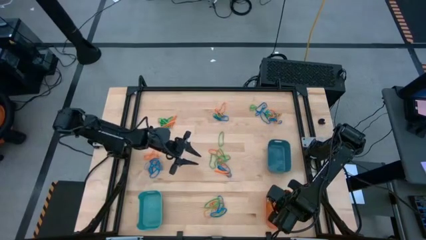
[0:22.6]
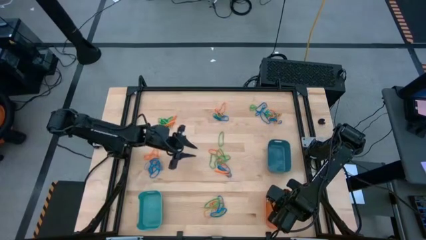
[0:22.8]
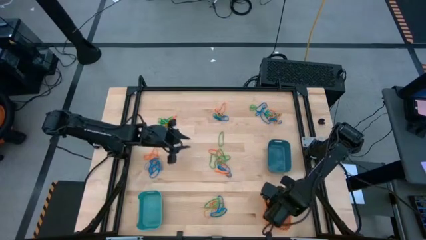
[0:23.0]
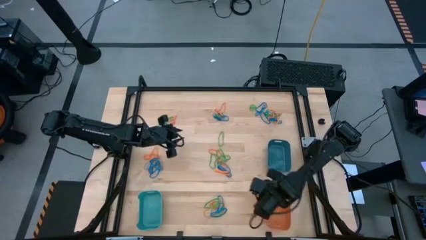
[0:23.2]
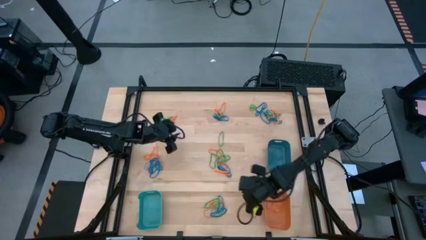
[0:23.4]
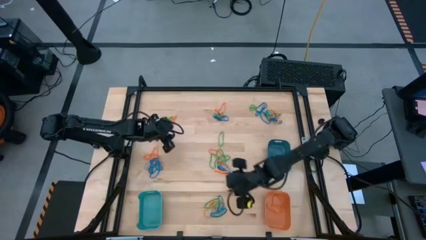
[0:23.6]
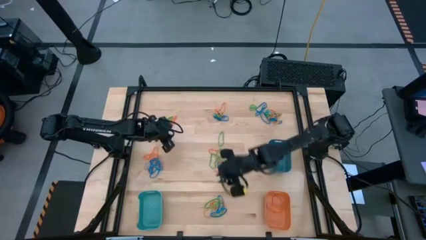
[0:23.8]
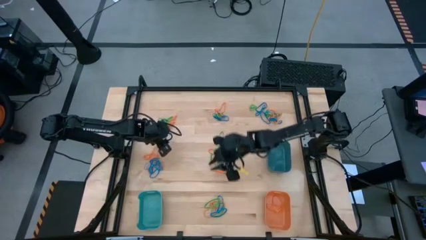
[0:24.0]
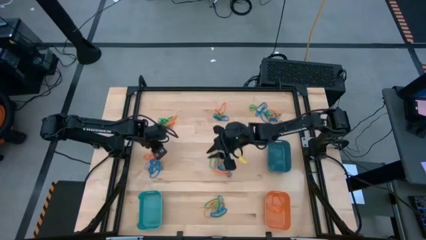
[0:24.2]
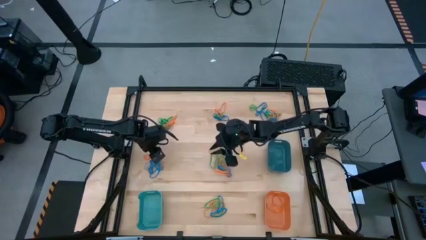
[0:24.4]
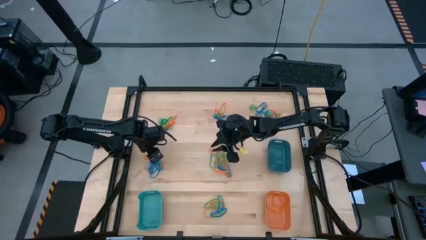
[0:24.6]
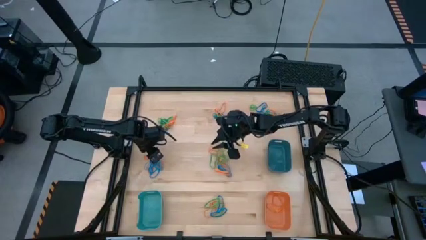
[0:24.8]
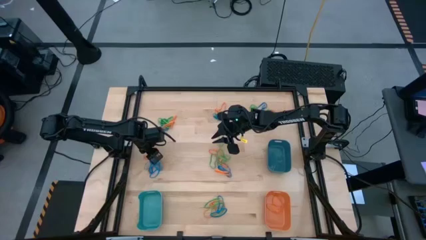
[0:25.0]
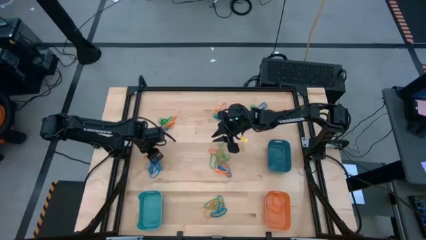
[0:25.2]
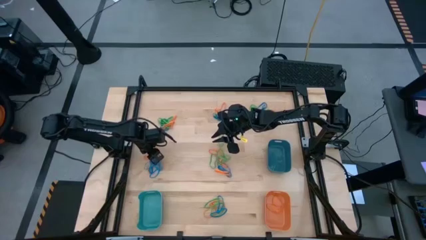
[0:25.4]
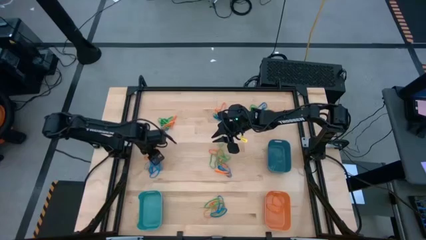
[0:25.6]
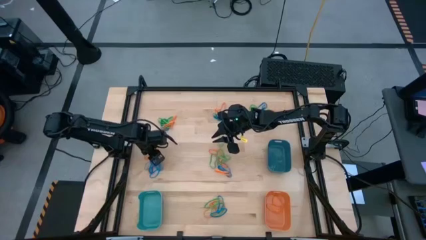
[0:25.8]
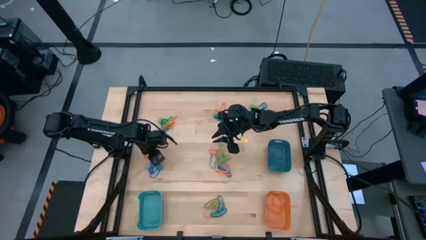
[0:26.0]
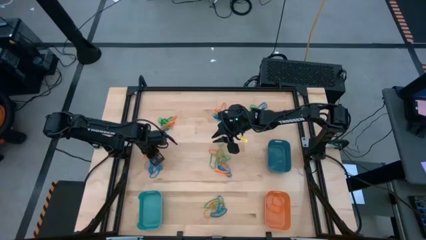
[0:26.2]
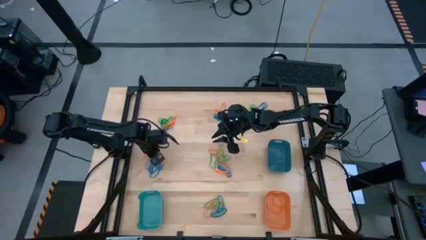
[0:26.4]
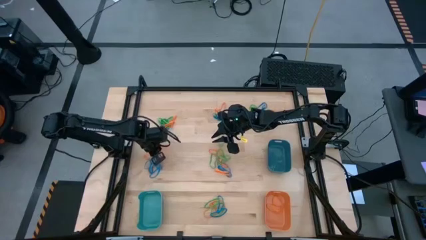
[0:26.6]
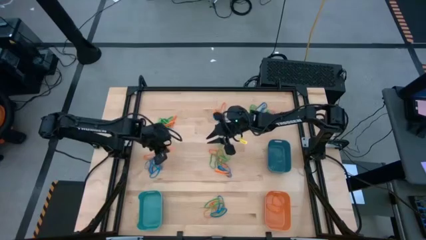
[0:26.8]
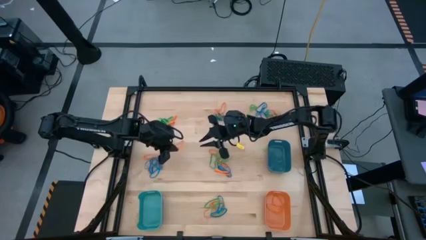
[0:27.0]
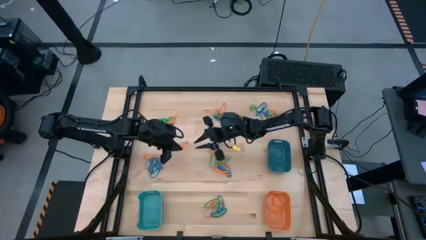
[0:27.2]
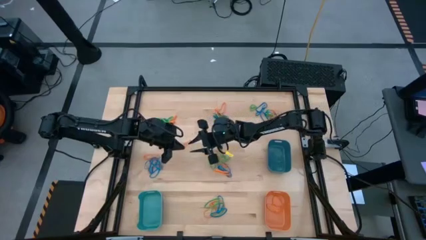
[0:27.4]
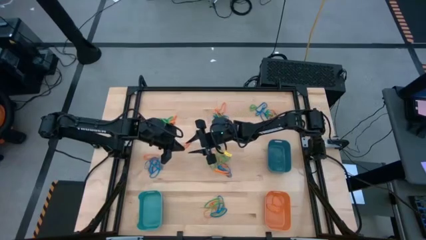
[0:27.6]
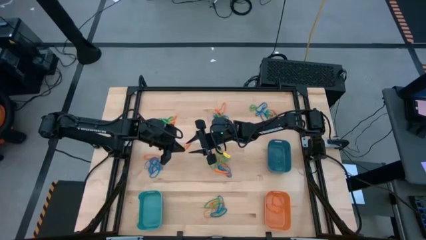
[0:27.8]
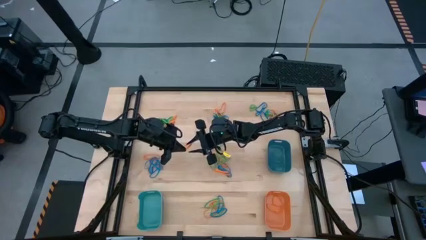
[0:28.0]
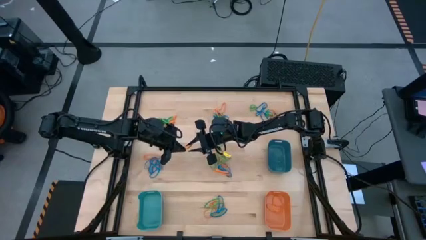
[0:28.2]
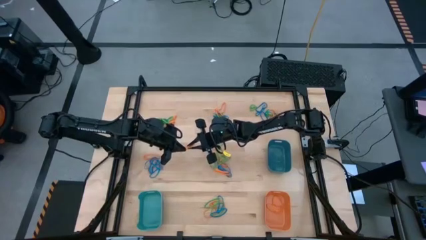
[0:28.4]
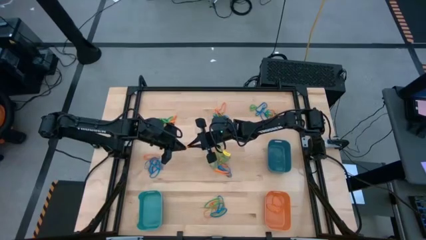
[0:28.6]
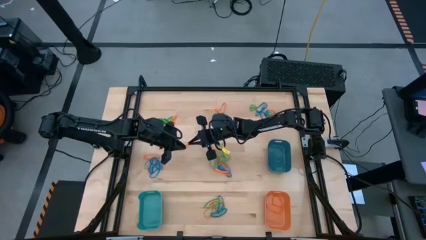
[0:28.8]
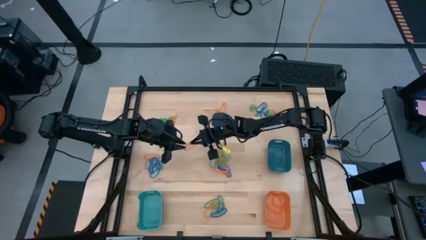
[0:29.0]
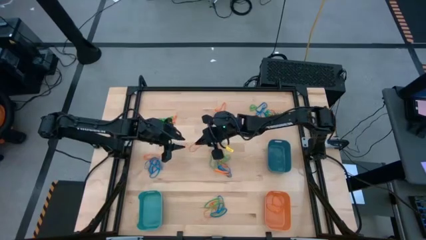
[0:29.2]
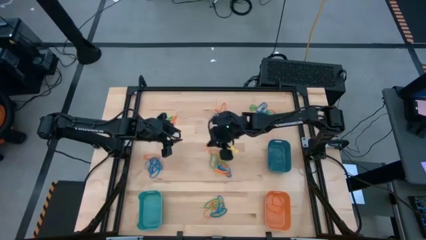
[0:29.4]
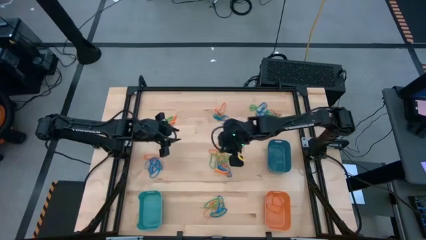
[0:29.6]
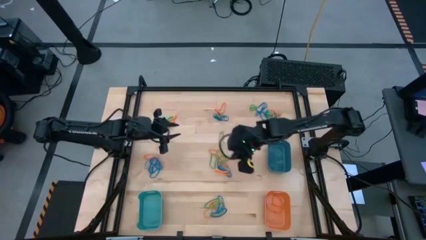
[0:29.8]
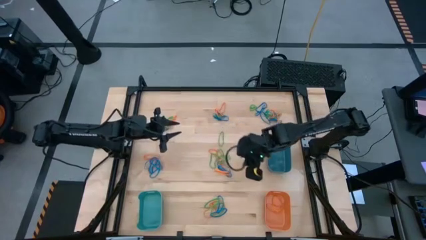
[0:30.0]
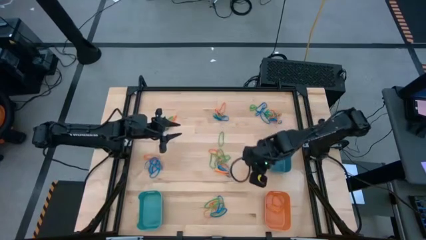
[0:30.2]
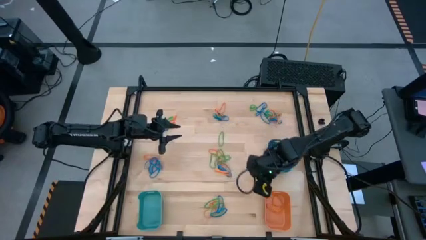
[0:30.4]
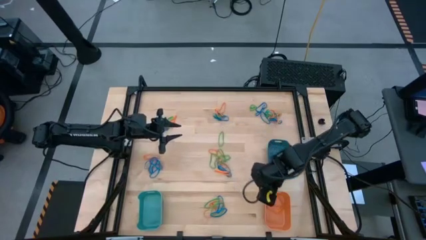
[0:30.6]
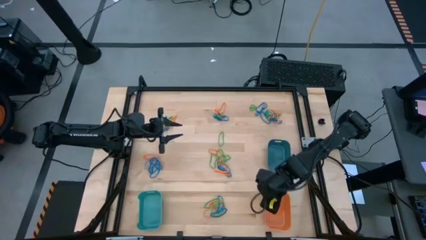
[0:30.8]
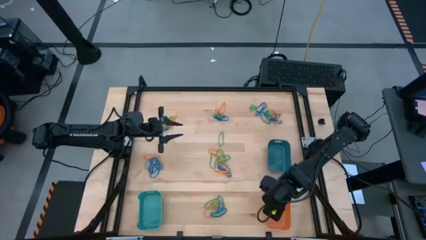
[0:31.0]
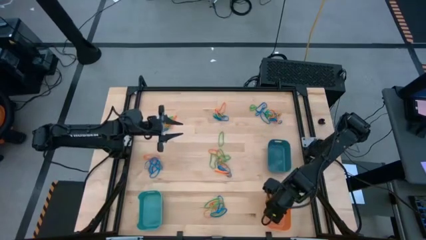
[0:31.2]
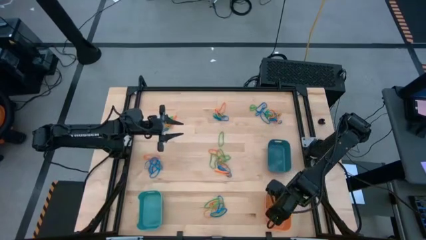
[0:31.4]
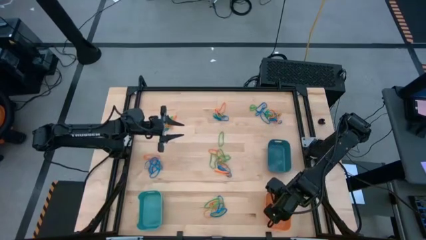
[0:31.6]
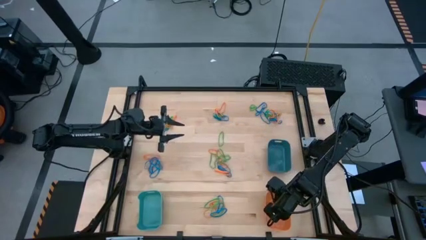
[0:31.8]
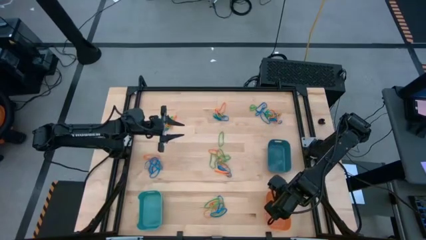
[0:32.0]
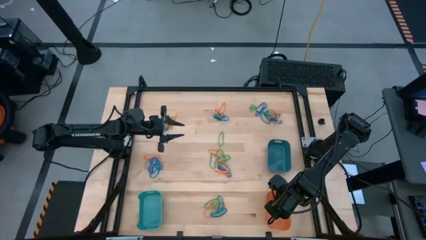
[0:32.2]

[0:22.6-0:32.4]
Task: Sort rubber bands into baskets
Put the orange rubber band into the orange bin

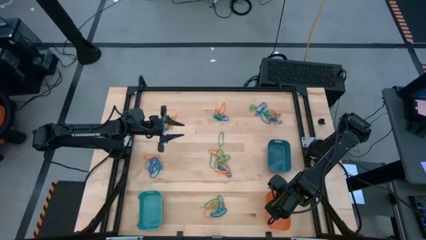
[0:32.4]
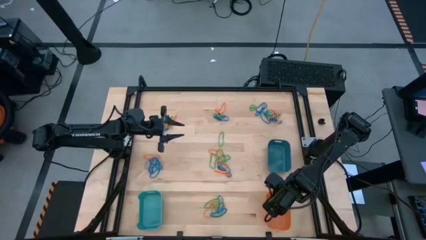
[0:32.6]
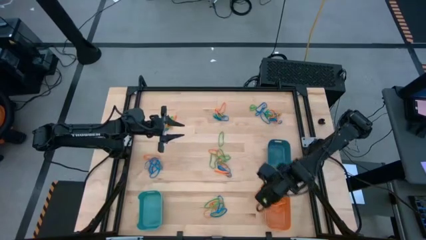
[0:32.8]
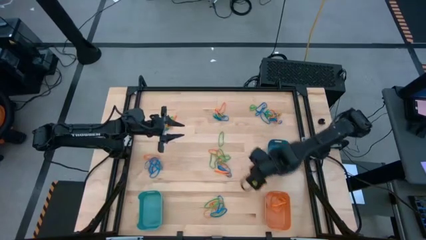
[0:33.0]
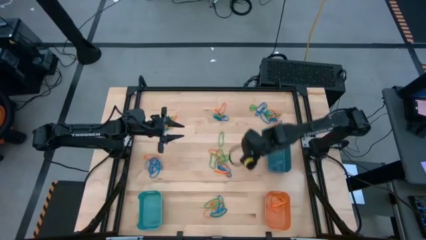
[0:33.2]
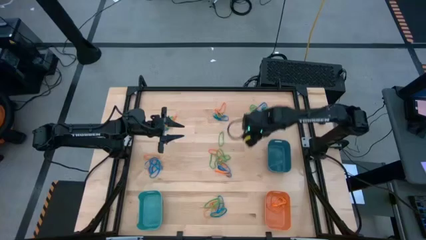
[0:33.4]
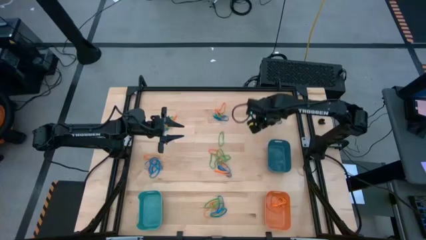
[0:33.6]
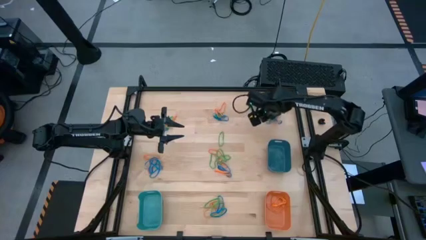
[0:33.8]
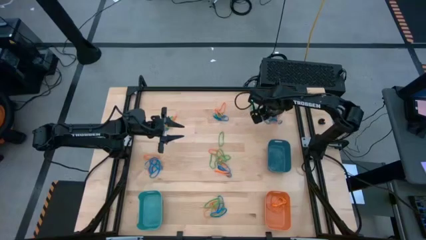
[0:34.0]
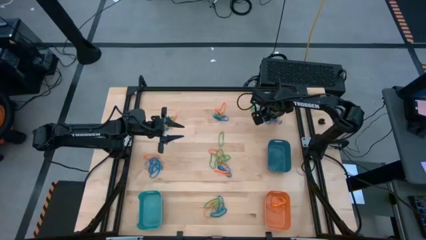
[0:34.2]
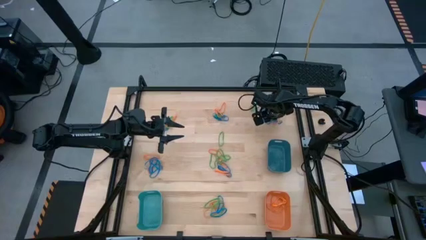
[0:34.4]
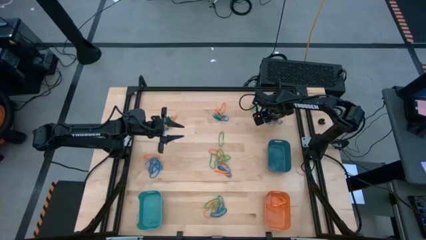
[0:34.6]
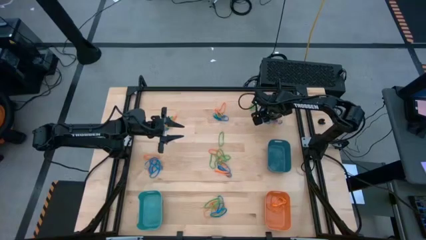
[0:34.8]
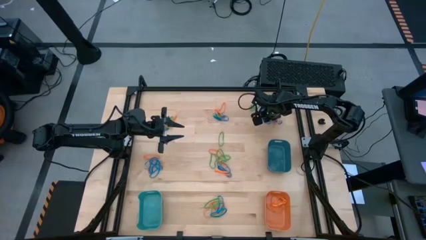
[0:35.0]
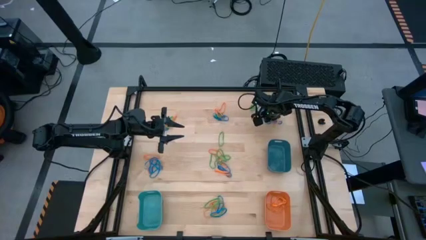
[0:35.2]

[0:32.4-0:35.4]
Put the orange rubber band into the orange bin

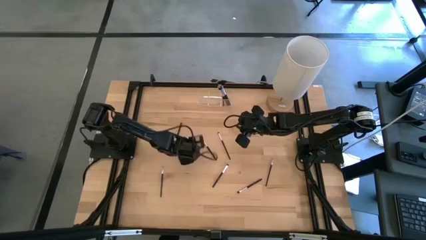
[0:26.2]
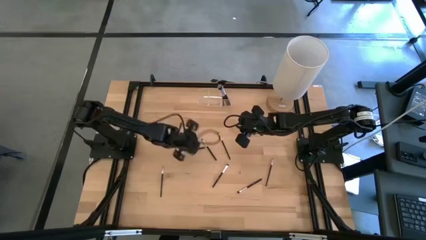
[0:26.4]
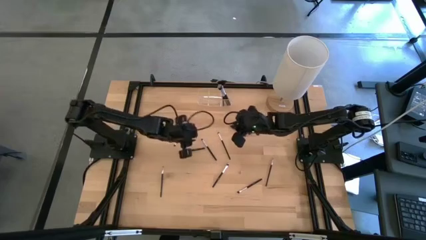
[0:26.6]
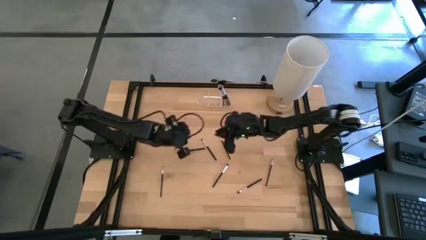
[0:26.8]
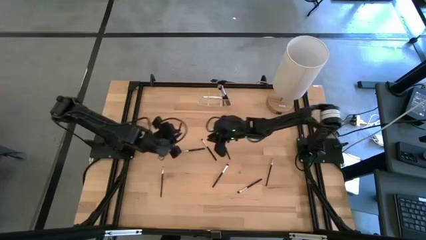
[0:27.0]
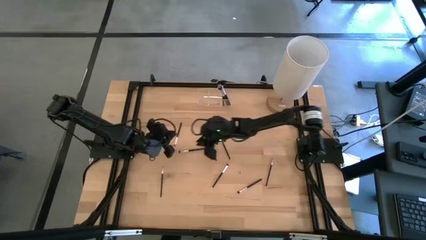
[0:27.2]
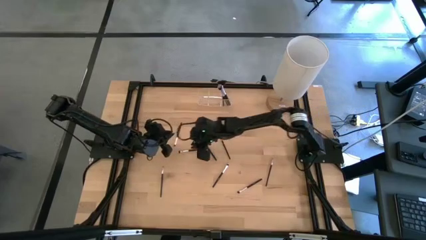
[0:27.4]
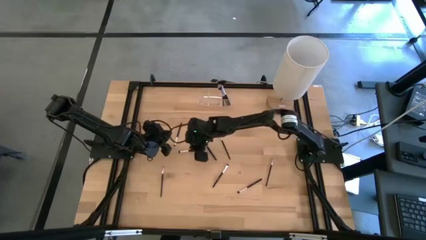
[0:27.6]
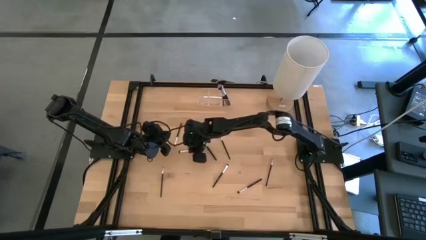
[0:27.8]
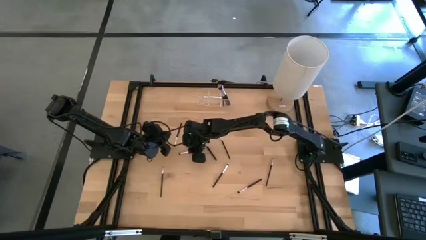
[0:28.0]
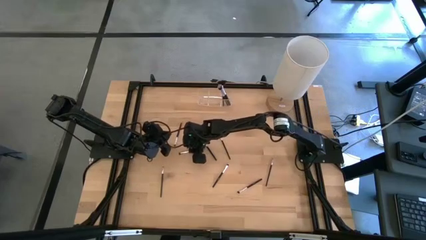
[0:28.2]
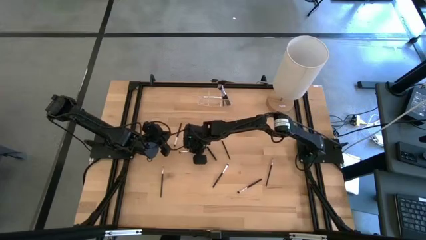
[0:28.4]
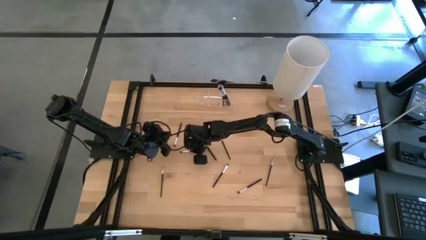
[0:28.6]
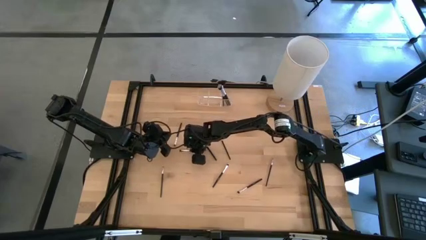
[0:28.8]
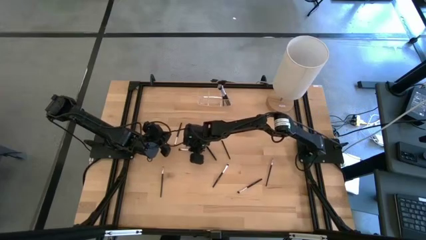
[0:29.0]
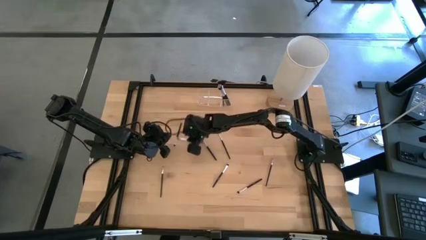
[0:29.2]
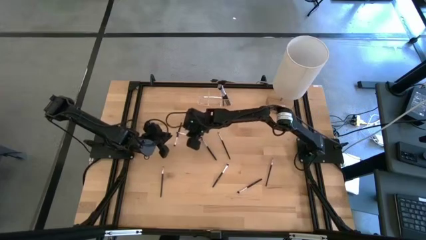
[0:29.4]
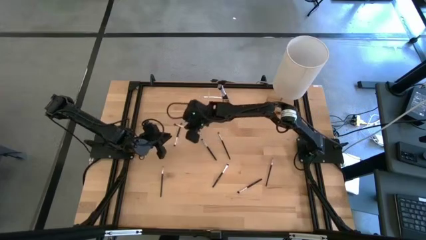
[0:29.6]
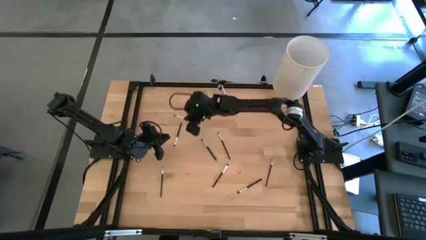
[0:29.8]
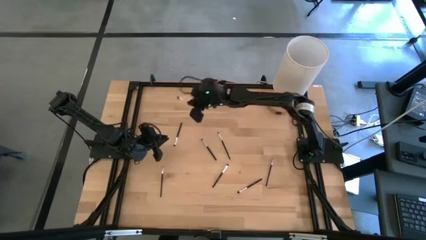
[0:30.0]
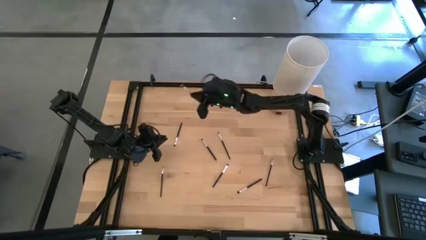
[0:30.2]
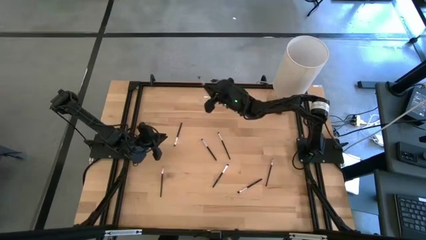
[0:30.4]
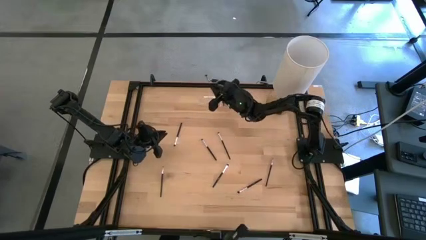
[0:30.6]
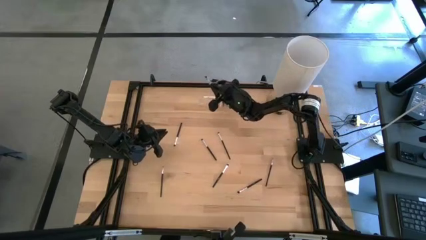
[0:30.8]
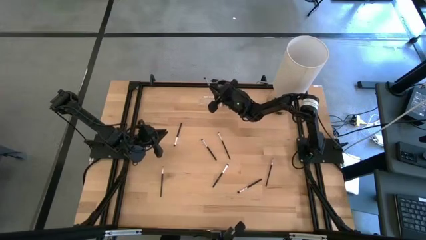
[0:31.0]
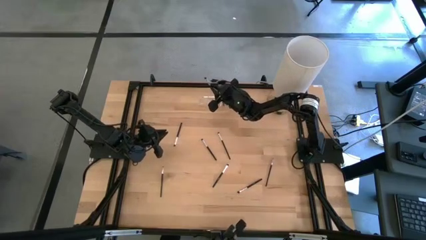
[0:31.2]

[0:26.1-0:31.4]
Task: Put items in baskets/containers
Put the black eyeshadow brush into the transparent organizer
